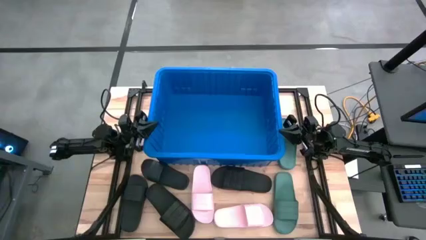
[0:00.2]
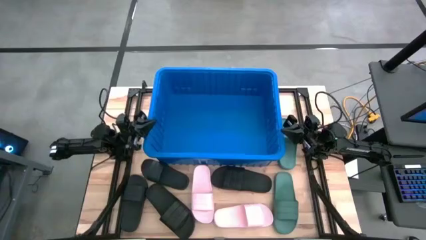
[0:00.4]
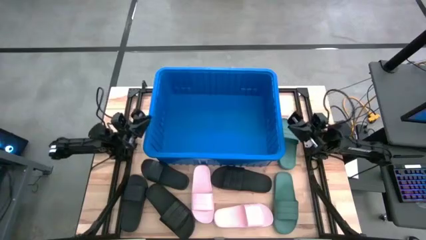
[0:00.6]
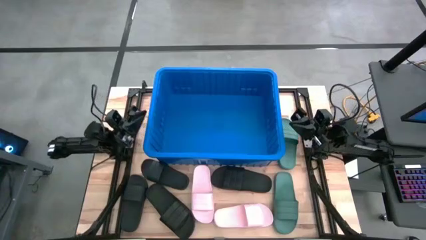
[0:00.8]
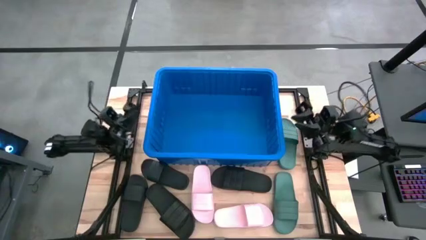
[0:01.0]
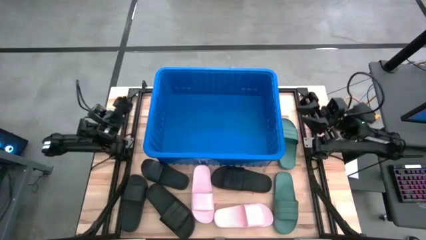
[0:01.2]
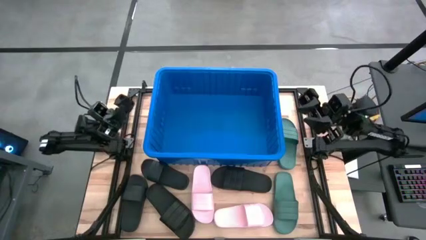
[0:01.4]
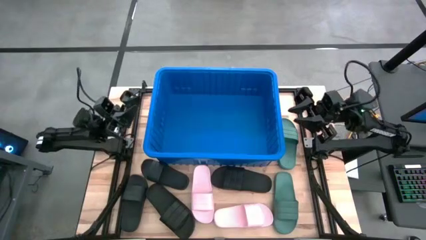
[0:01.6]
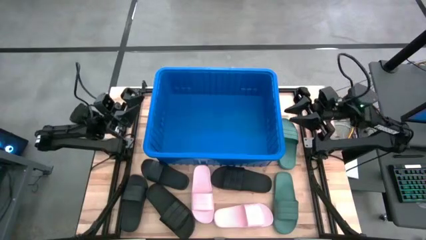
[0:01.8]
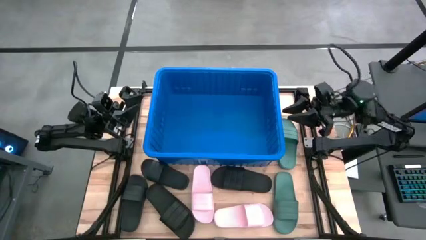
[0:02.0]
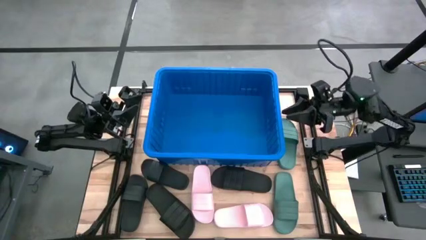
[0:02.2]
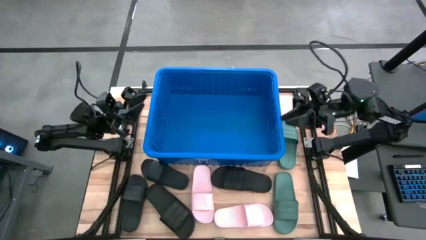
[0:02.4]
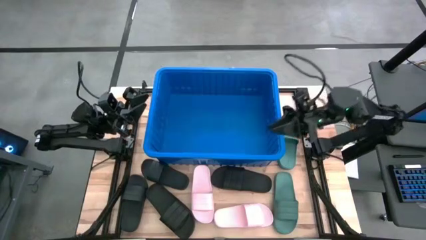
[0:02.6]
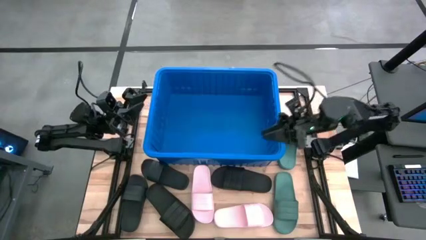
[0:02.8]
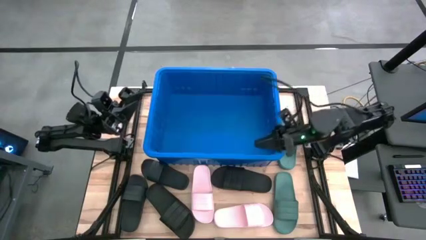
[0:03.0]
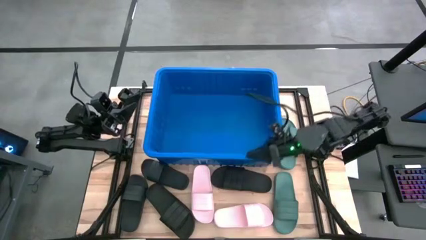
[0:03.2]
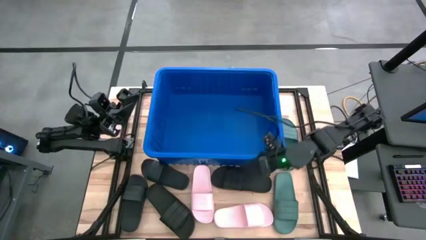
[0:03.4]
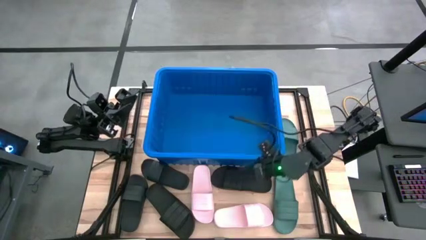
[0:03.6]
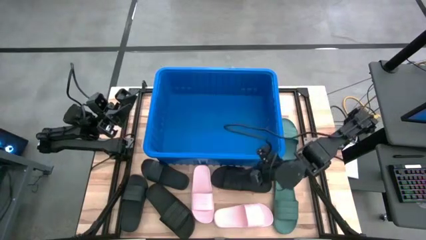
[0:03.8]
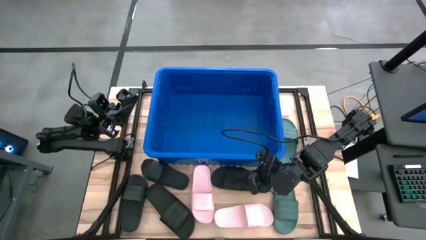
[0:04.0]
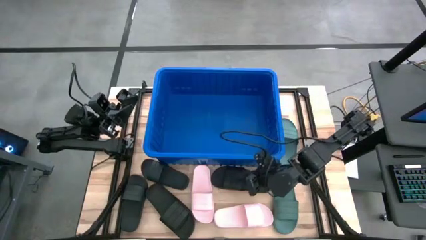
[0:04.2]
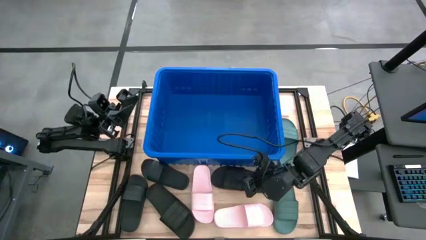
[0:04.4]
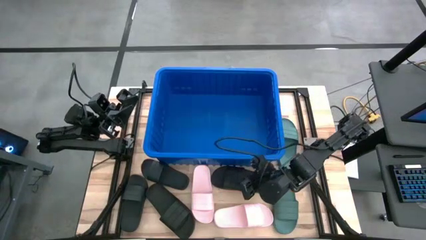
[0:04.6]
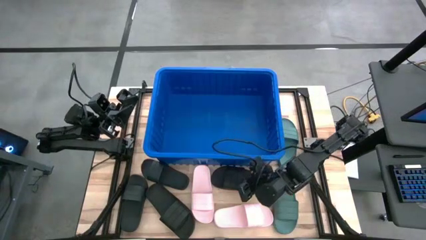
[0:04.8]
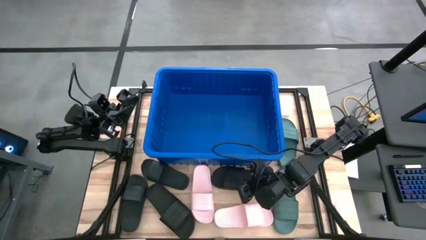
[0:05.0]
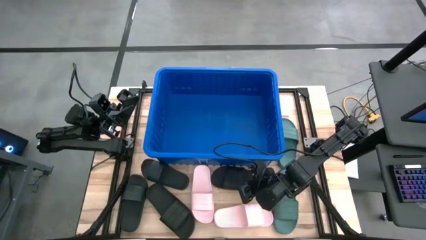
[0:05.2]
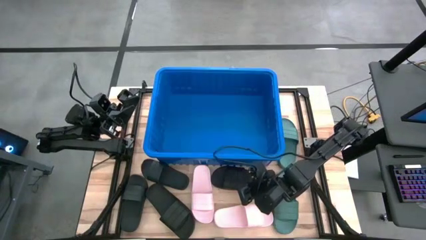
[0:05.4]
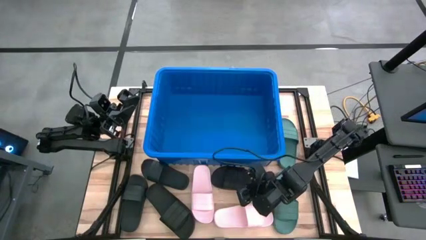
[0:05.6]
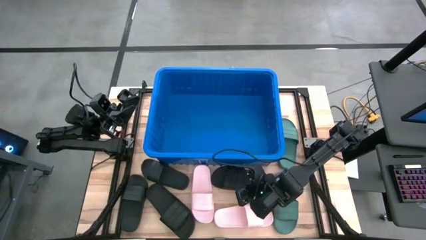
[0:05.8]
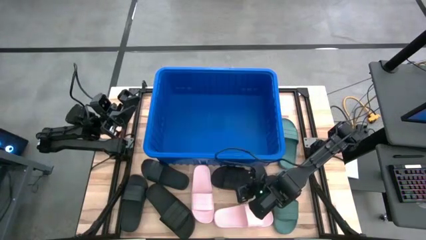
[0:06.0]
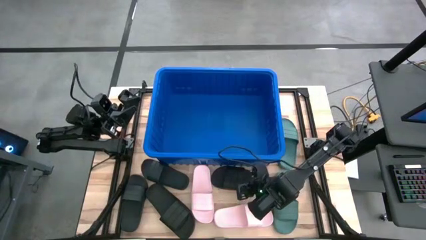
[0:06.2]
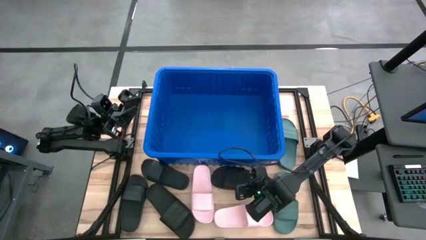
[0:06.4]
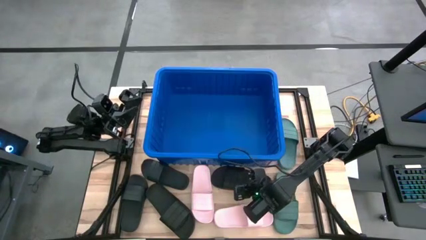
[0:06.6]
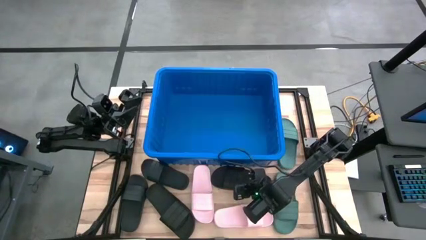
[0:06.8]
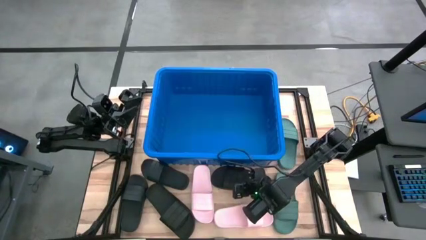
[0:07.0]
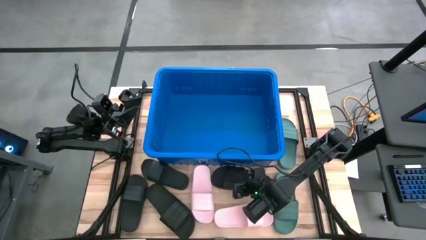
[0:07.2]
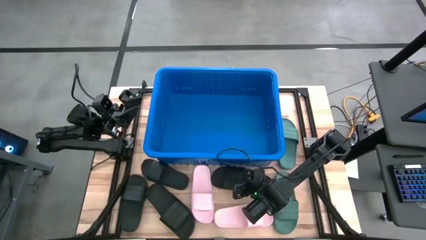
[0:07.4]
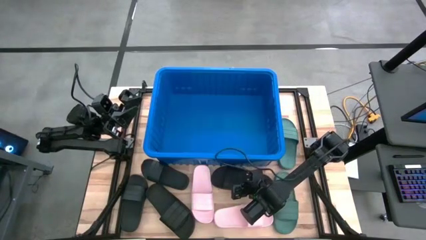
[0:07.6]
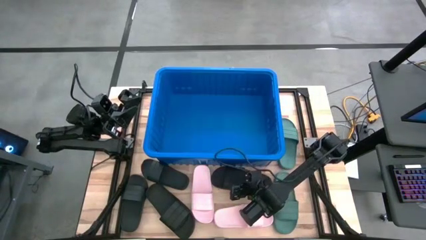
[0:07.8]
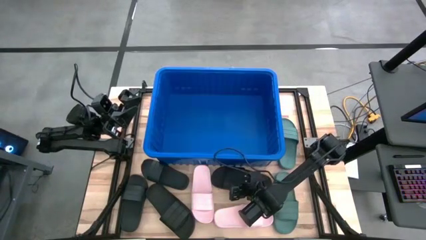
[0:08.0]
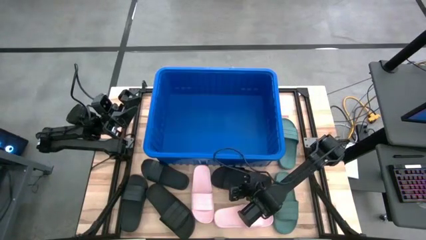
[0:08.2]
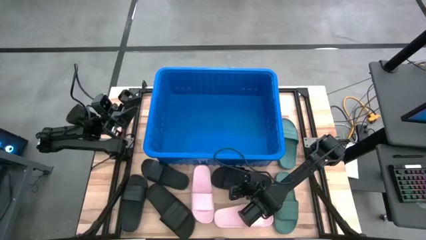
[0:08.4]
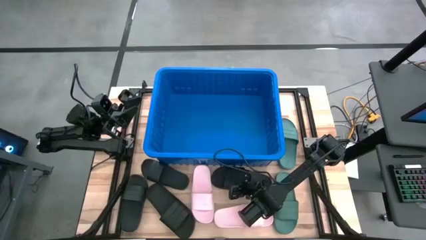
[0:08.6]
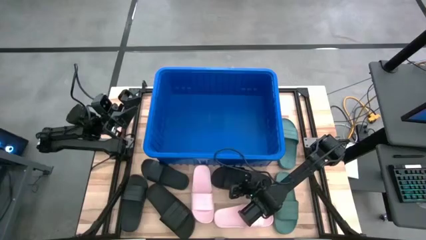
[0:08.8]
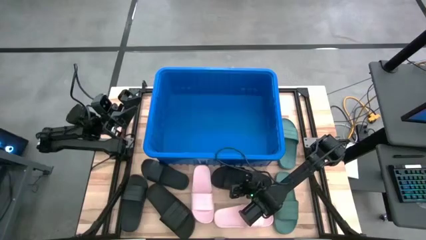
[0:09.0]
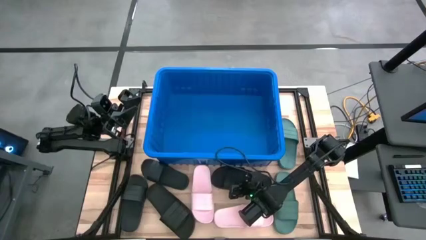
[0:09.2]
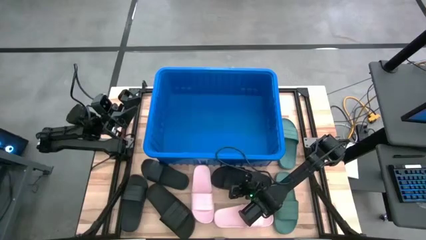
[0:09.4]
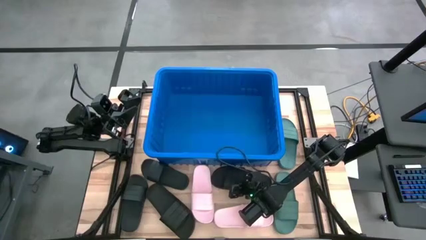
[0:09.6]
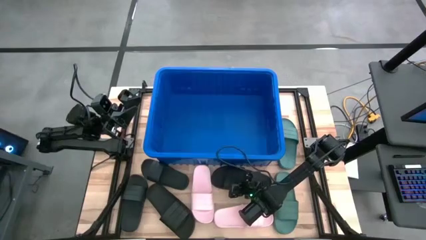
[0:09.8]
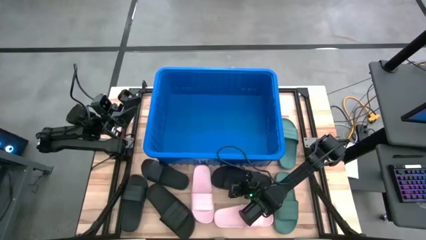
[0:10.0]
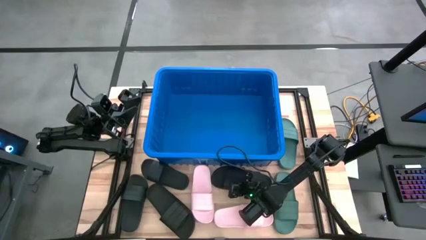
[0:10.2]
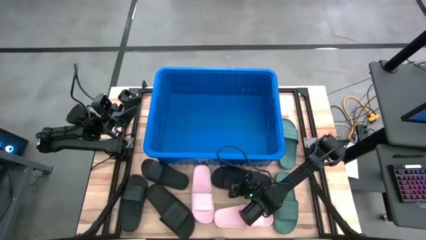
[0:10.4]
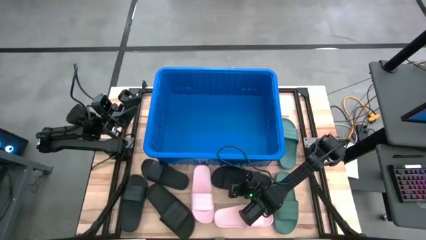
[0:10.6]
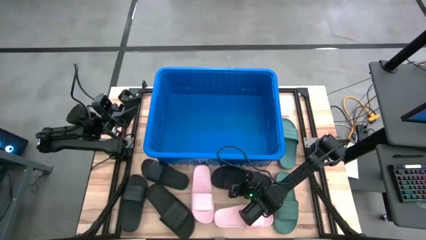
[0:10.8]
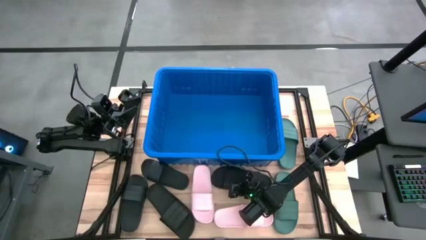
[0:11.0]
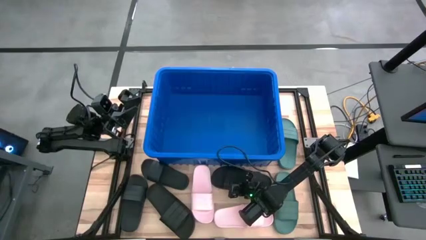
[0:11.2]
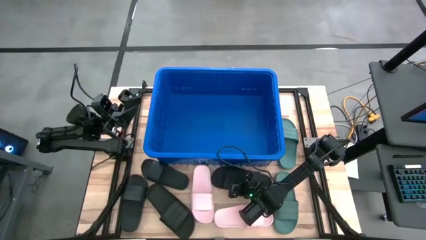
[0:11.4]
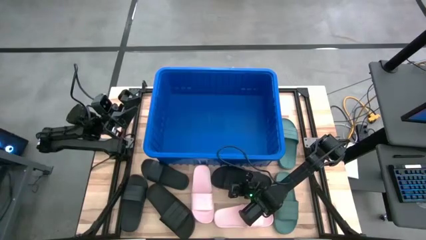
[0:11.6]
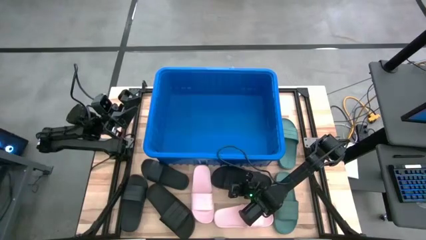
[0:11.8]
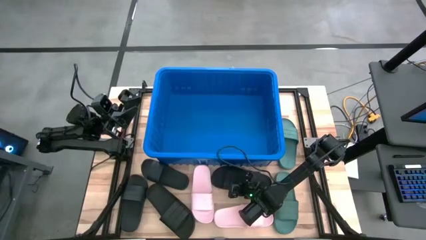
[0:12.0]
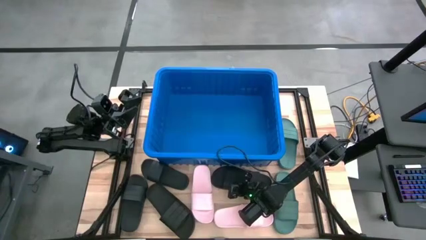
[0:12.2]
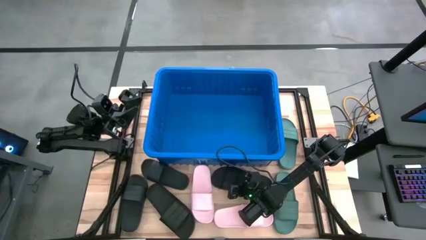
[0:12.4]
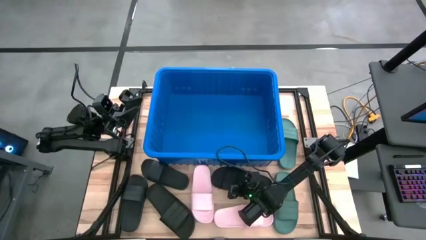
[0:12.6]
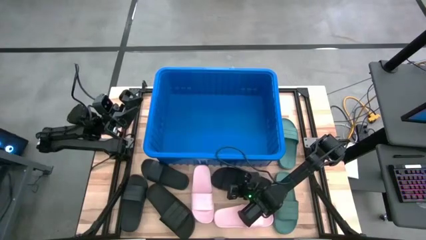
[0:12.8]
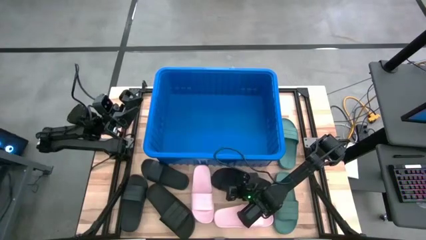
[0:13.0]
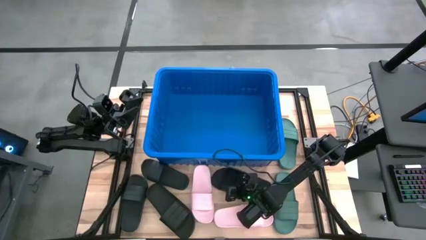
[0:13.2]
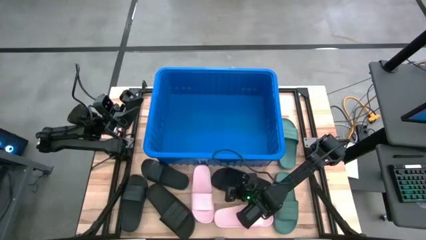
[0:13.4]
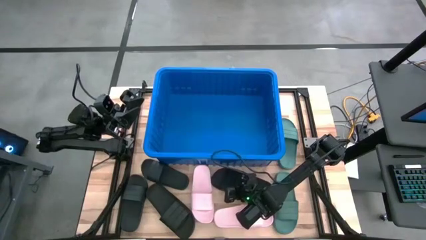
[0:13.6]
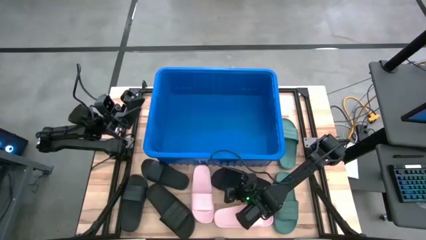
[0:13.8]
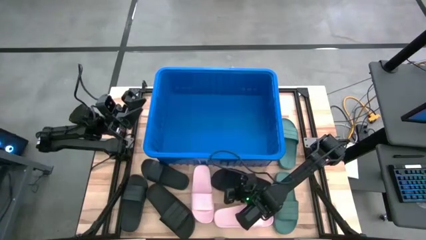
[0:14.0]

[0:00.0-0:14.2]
Task: Pick and place slides into bin
Put the black slide into the blue bin
